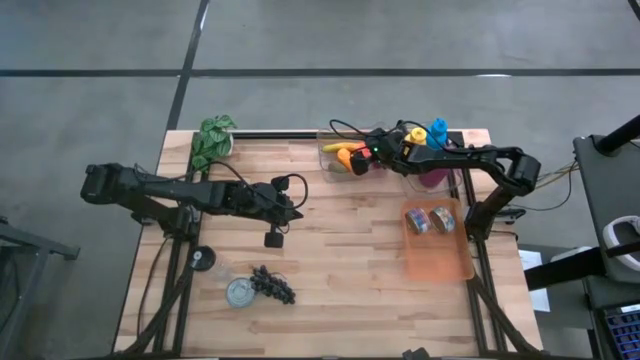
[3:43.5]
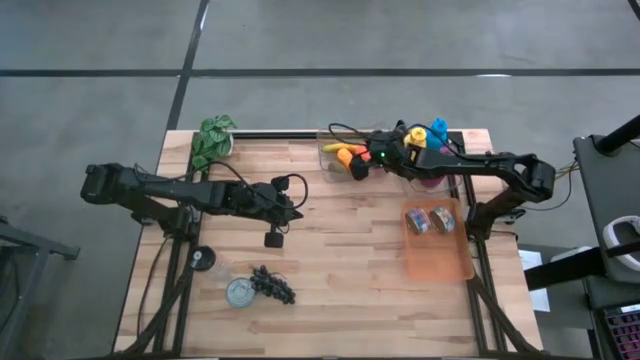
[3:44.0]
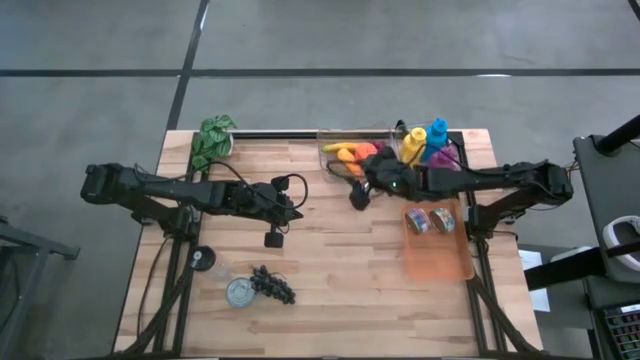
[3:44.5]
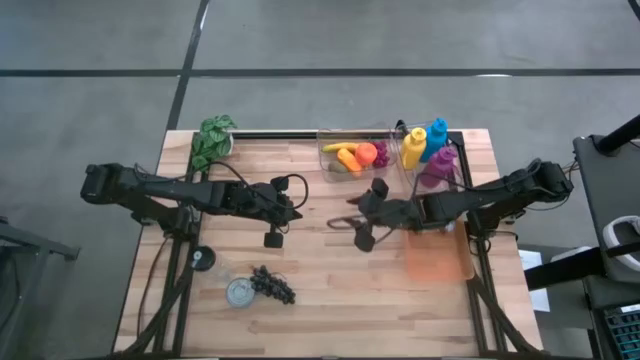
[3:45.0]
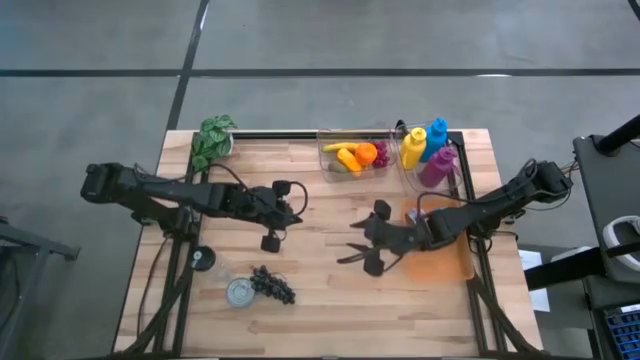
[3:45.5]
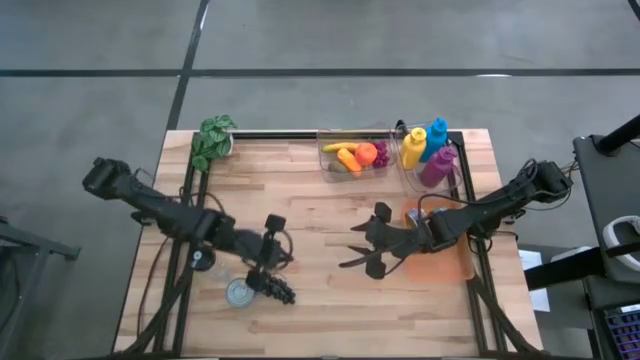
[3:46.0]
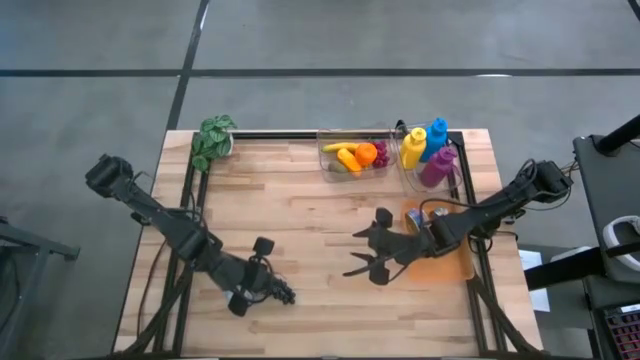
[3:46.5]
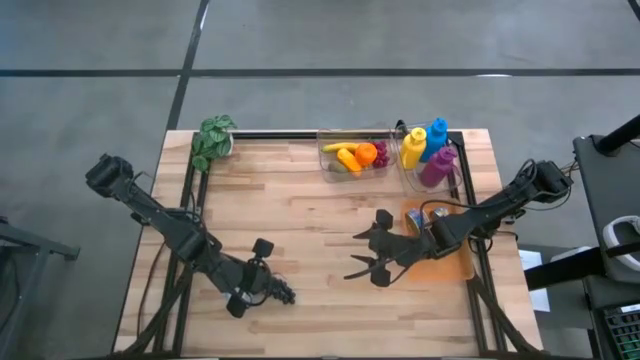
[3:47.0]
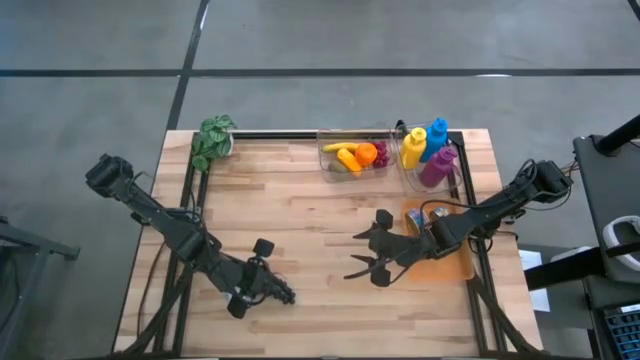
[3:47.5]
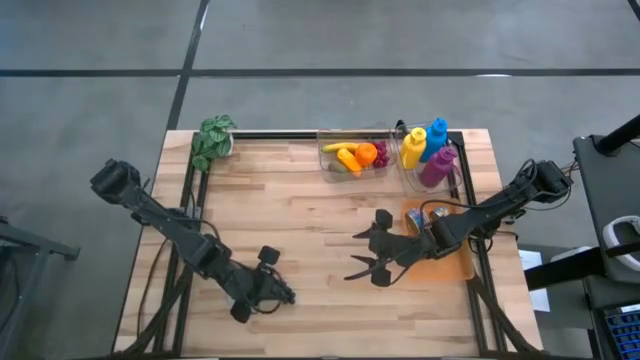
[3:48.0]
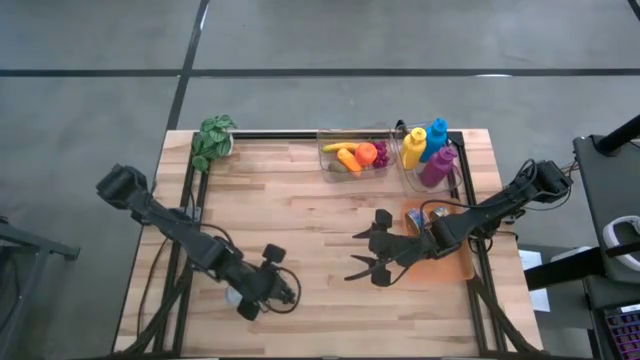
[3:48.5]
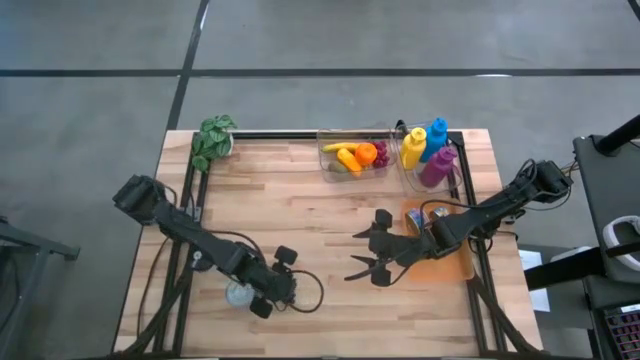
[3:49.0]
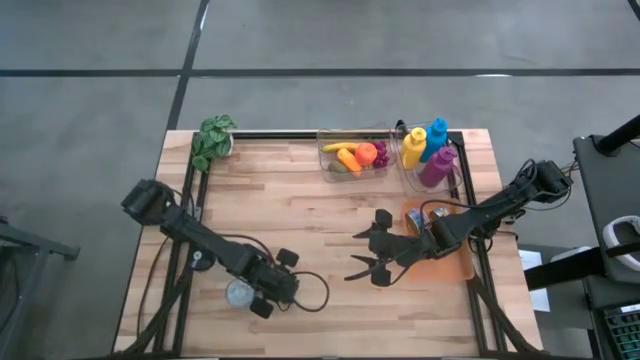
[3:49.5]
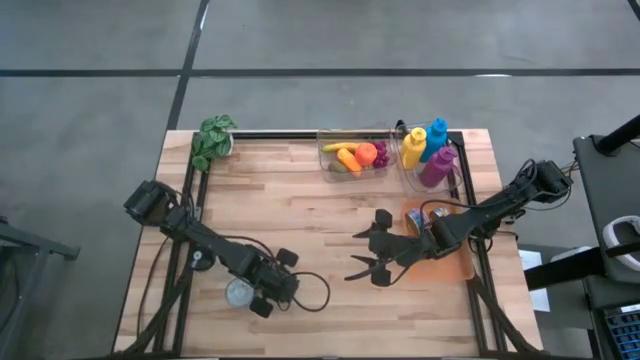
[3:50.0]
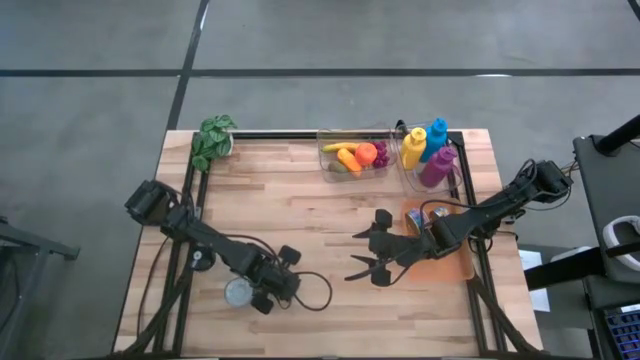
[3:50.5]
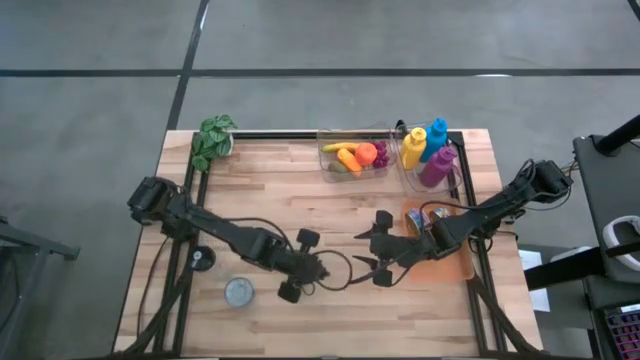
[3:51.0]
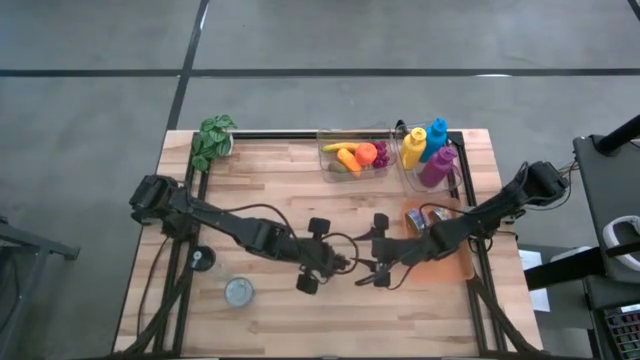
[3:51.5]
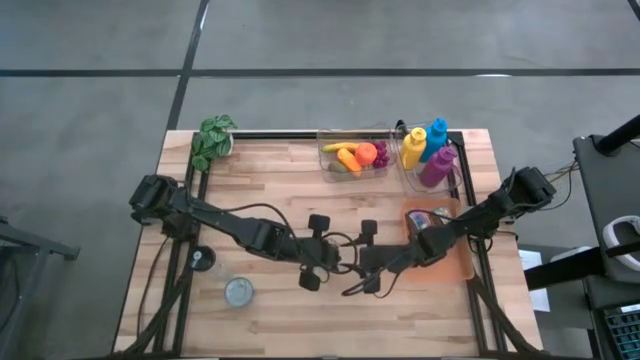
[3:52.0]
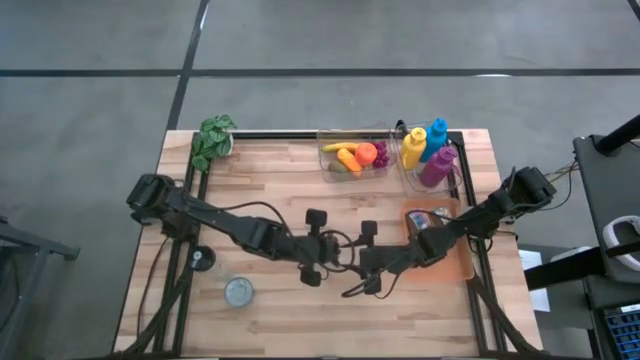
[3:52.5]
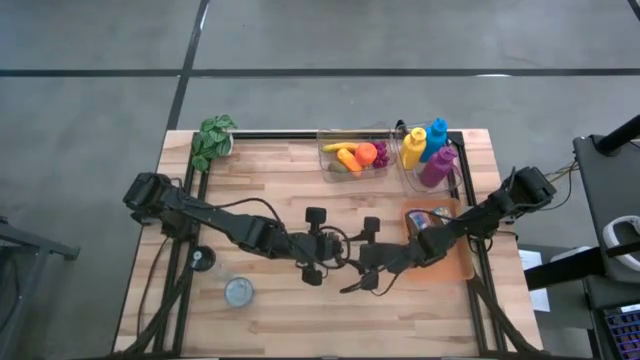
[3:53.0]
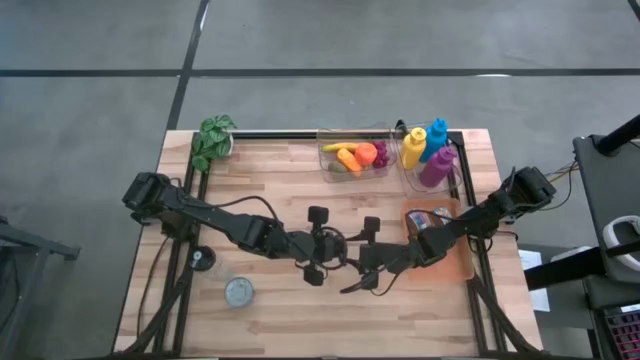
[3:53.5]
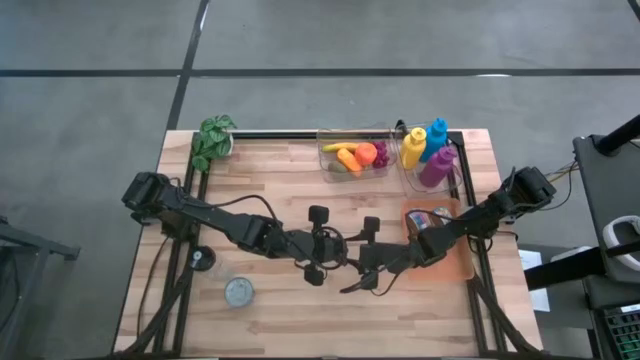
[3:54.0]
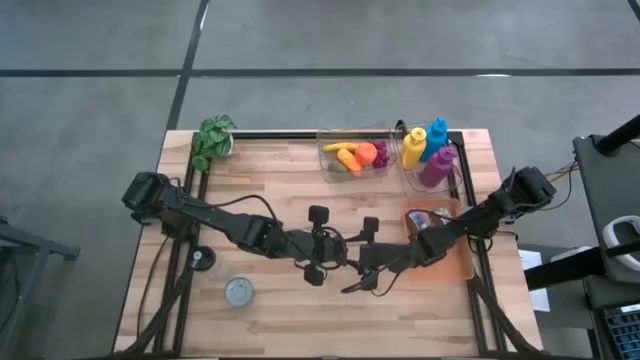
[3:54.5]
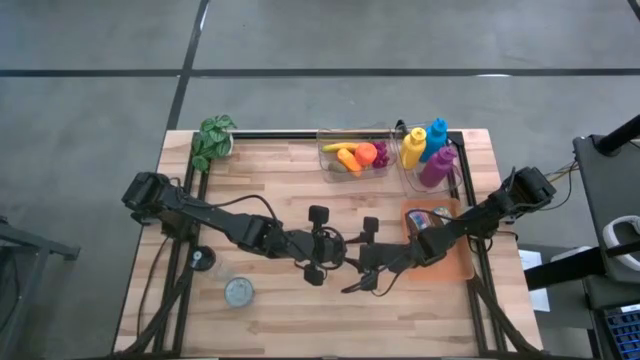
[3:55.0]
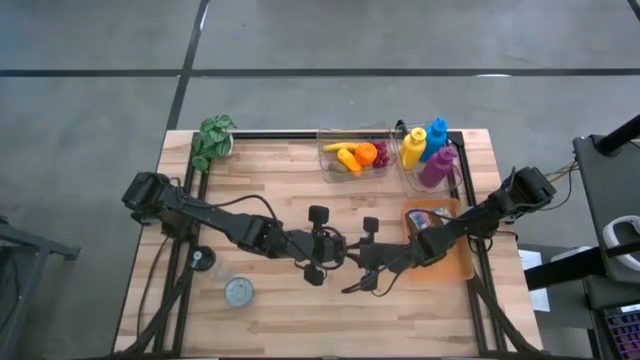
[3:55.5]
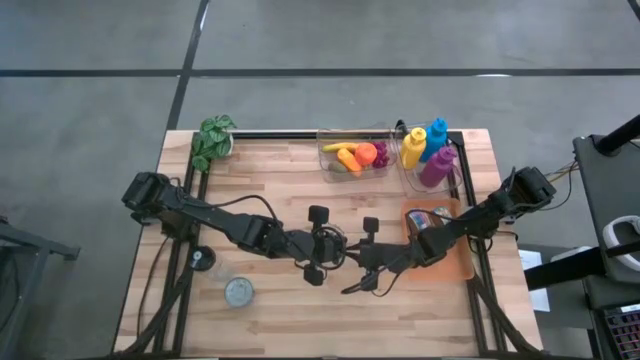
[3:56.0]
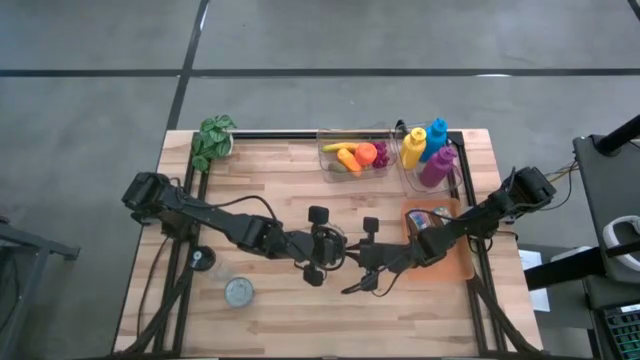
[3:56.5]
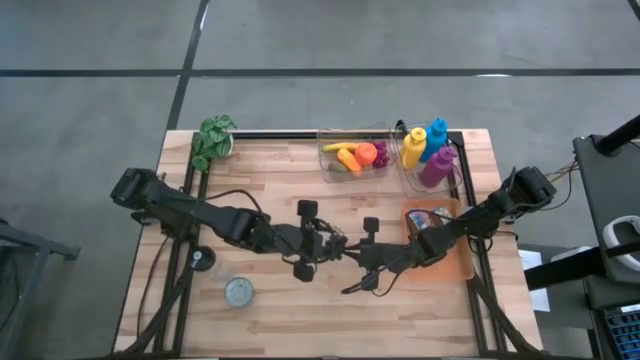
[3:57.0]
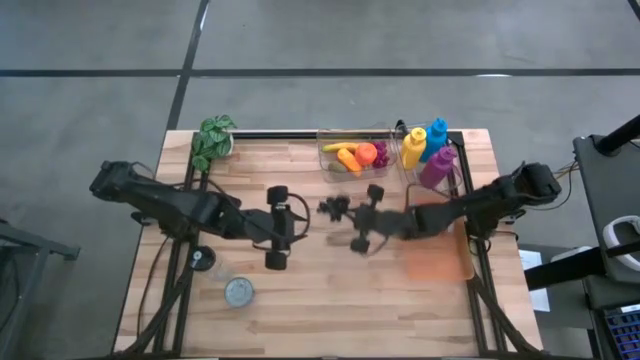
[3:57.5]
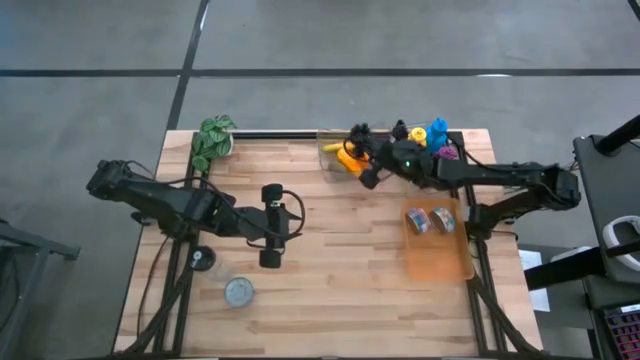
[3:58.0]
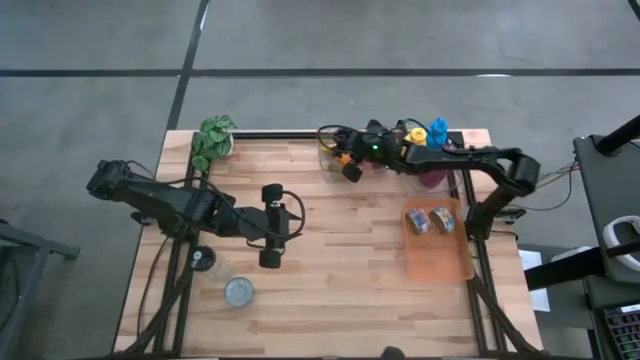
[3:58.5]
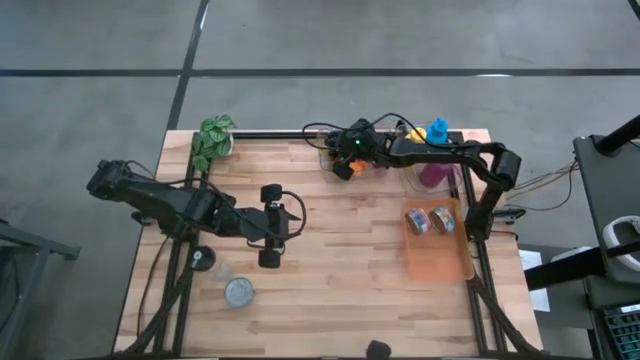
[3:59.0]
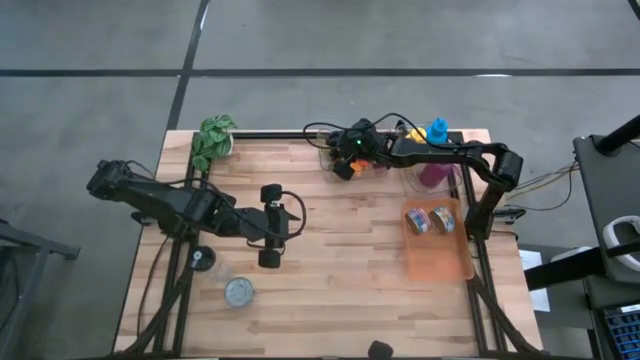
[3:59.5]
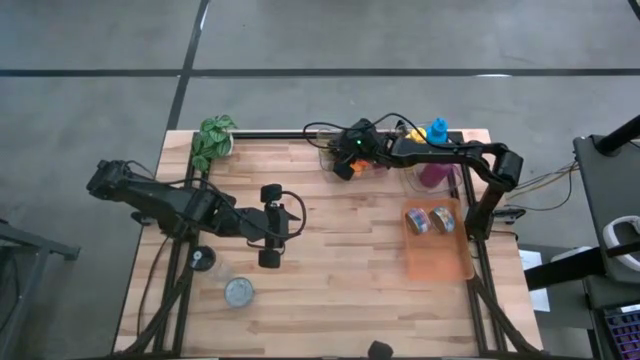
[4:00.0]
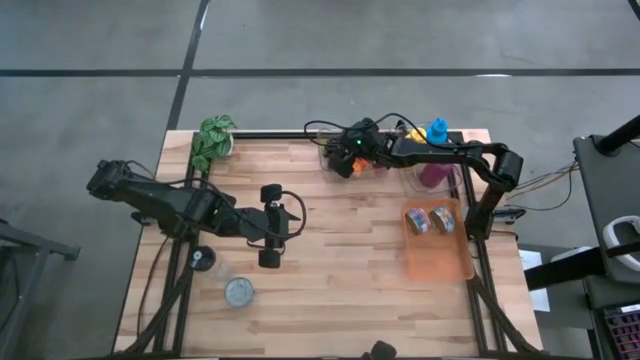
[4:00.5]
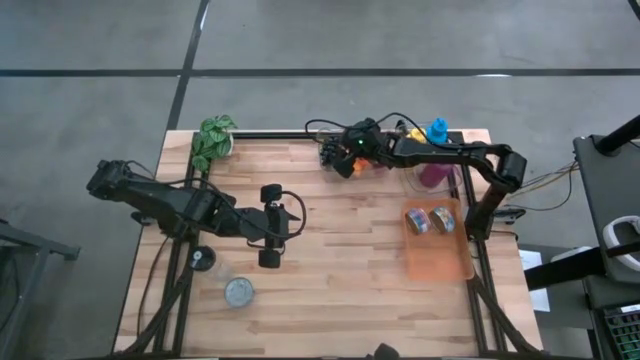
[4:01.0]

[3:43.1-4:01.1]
Task: Pick & Place Food Item
Put the black grapes into the left transparent bin

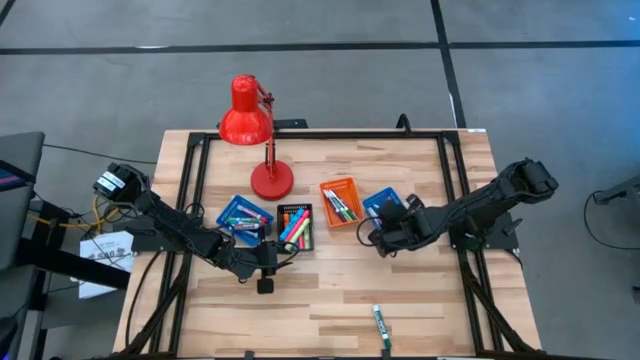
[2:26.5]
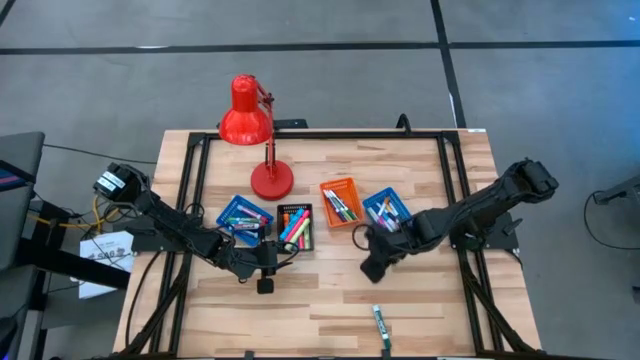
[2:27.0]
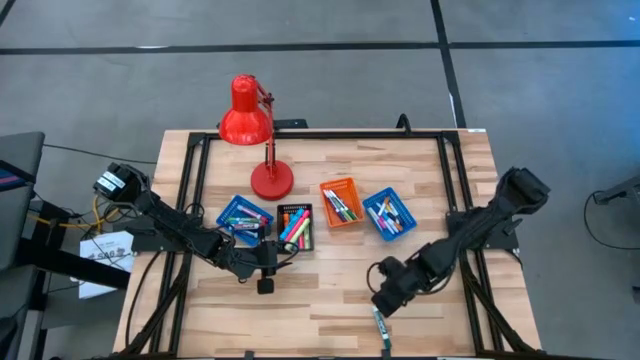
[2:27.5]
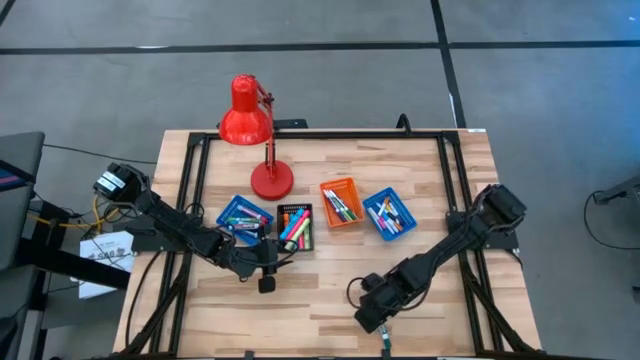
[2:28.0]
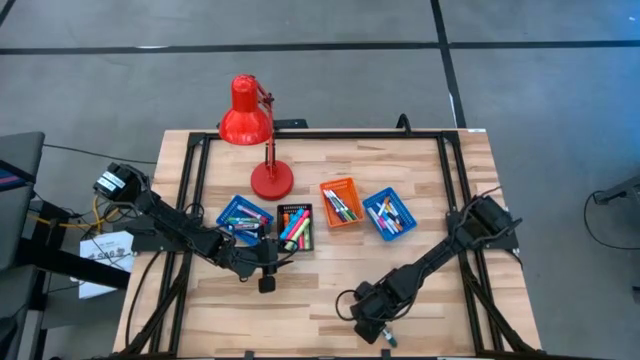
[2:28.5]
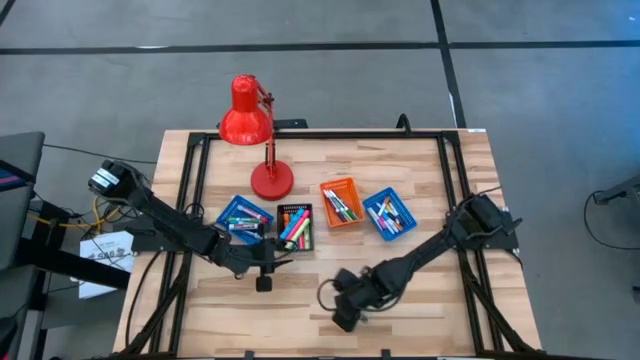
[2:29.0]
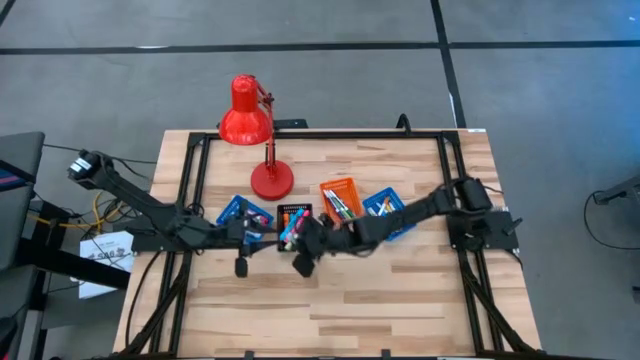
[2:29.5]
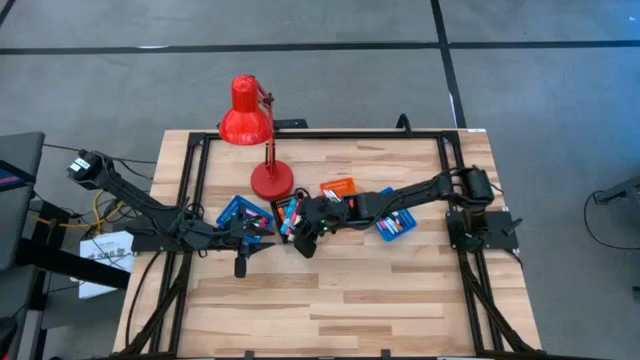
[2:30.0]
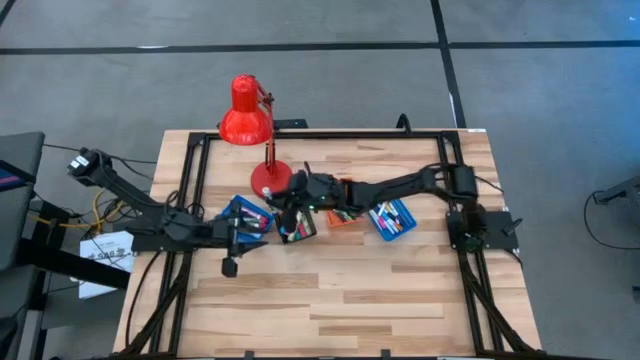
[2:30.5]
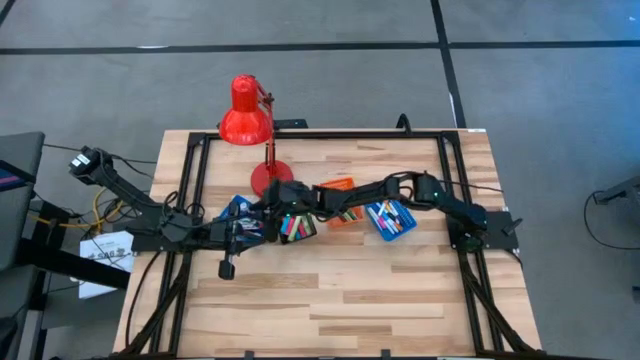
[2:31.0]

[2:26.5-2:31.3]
Task: Pick & Place Markers
Put the large green marker pen into the left blue basket
